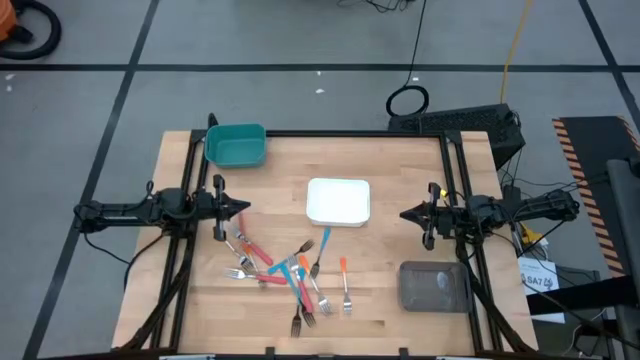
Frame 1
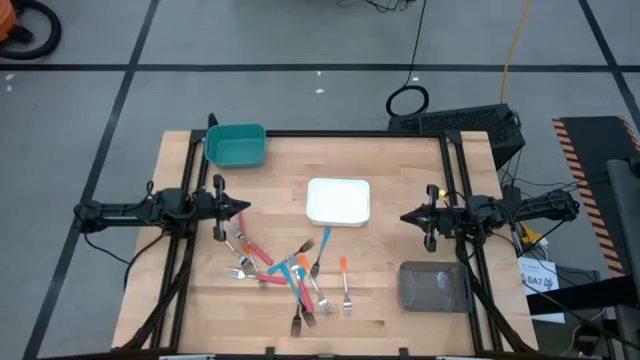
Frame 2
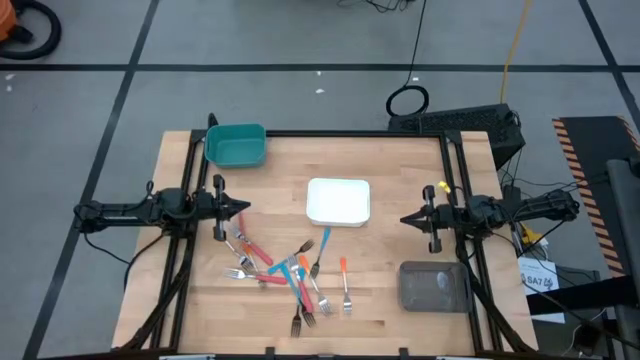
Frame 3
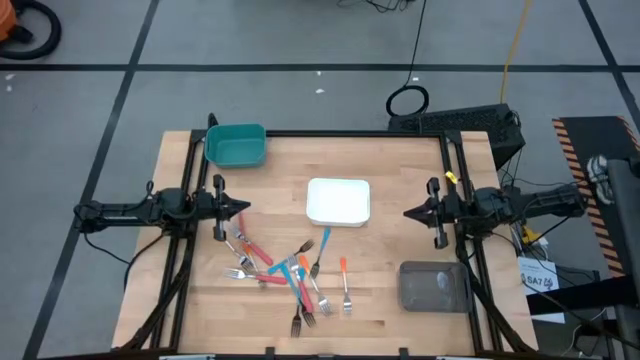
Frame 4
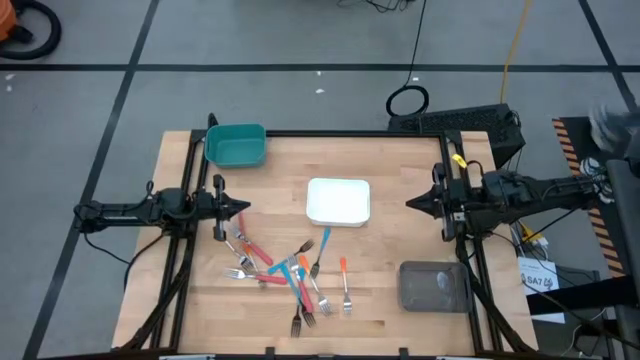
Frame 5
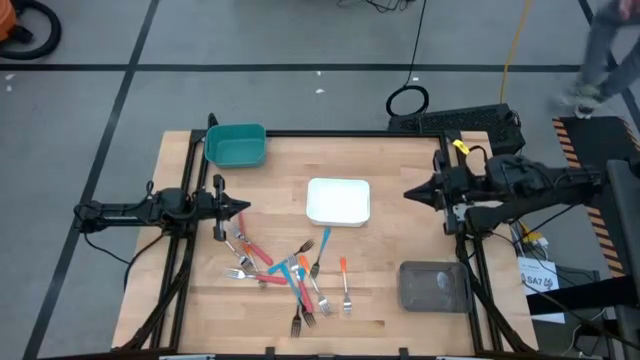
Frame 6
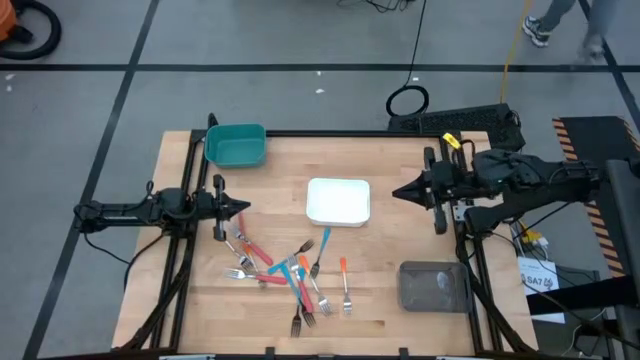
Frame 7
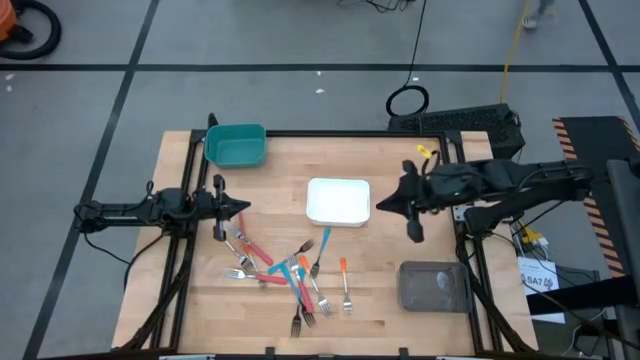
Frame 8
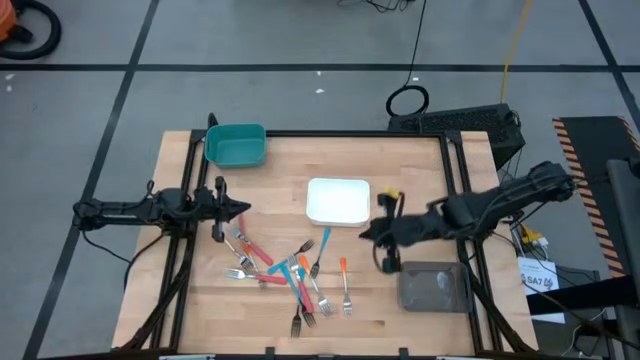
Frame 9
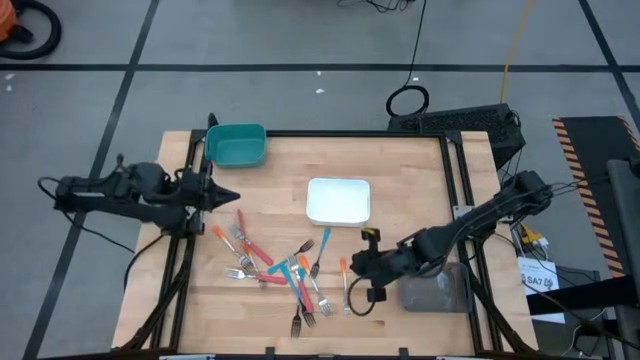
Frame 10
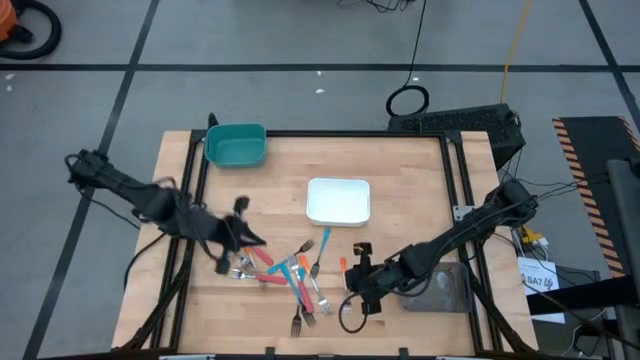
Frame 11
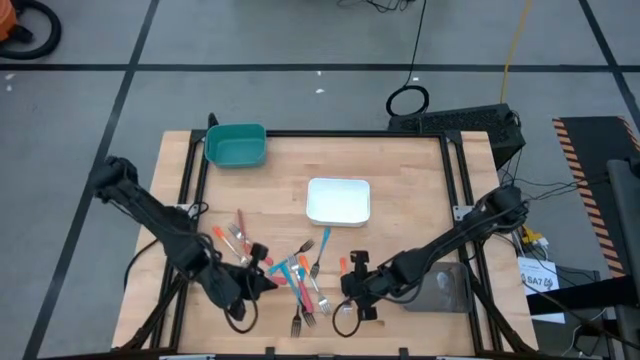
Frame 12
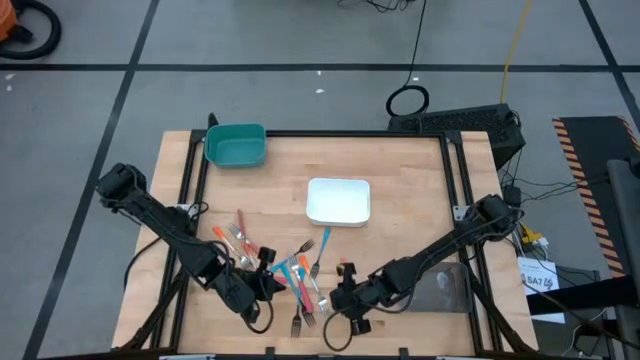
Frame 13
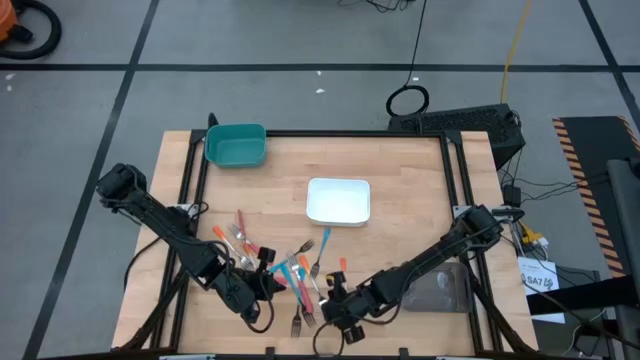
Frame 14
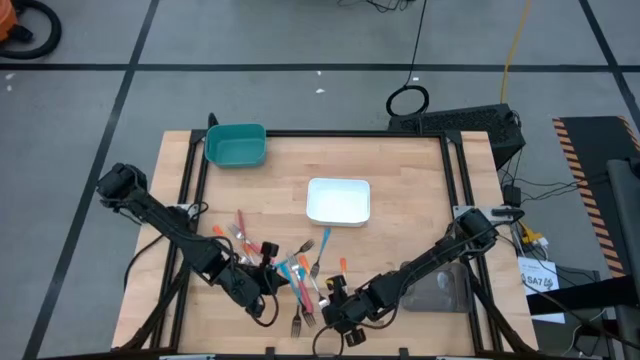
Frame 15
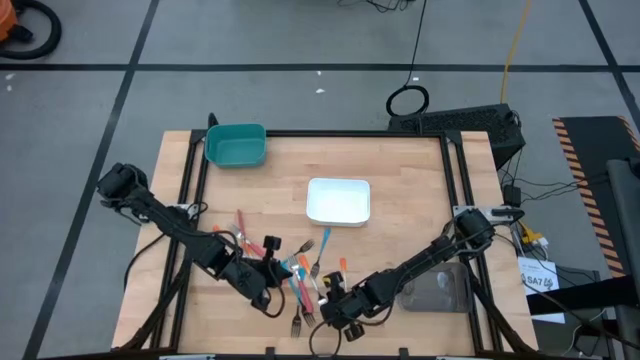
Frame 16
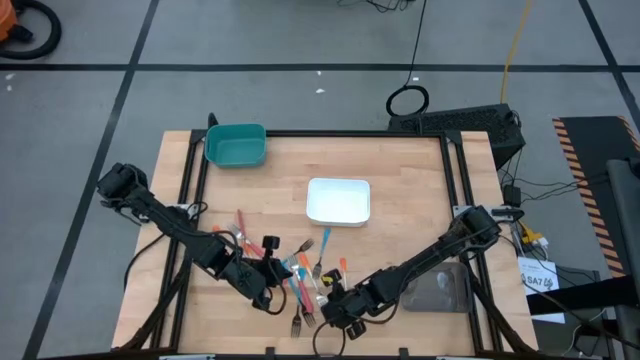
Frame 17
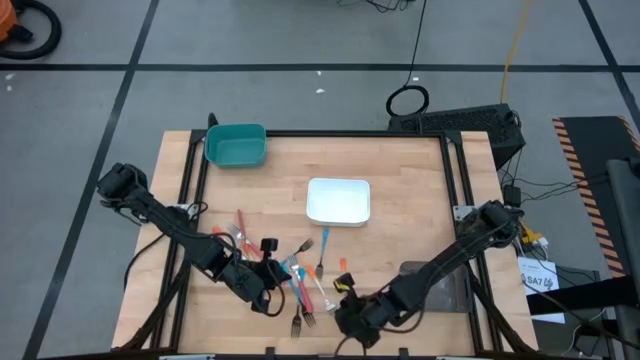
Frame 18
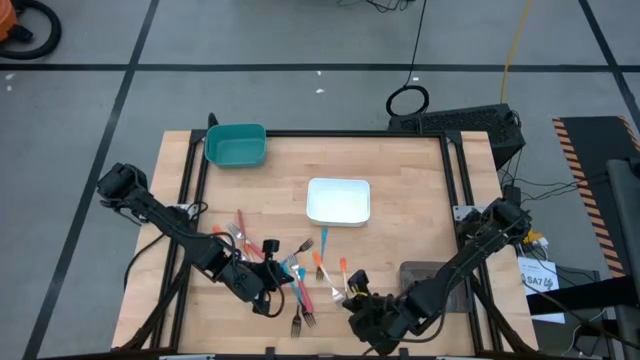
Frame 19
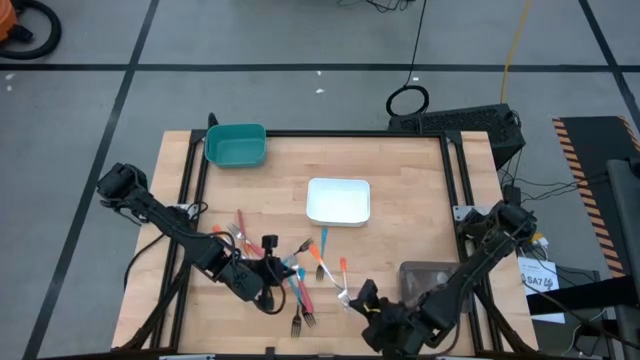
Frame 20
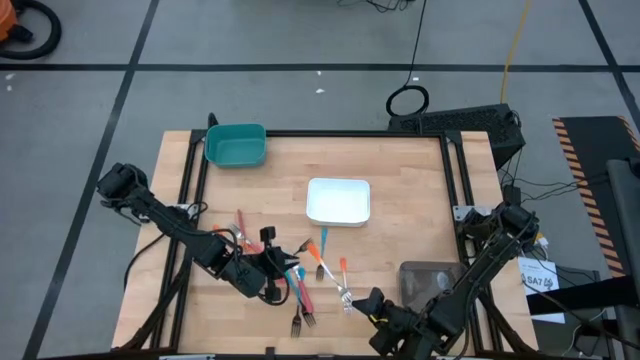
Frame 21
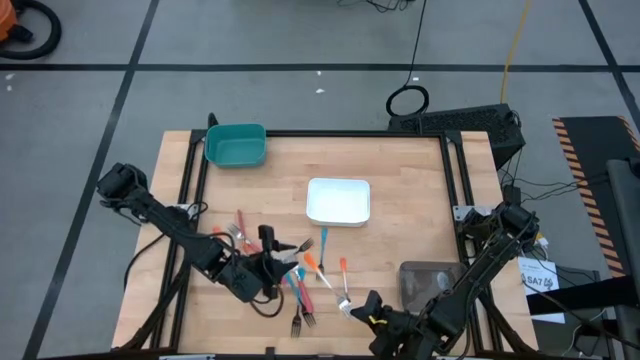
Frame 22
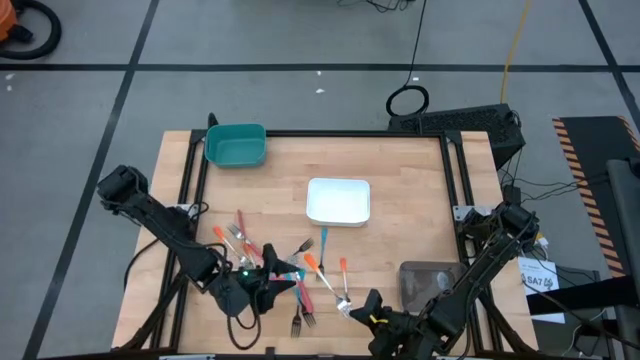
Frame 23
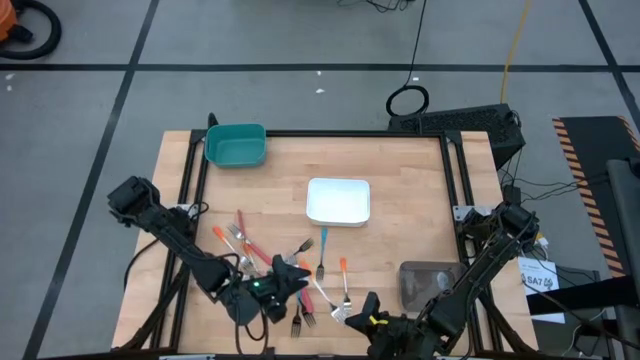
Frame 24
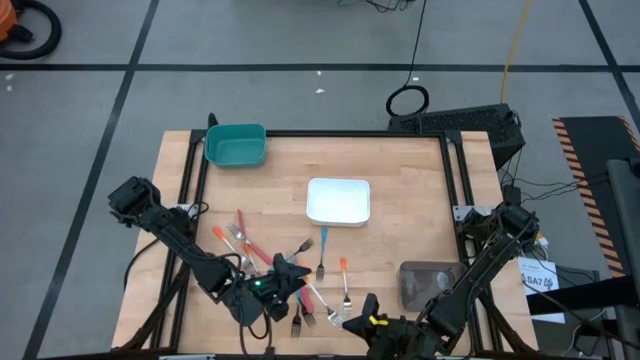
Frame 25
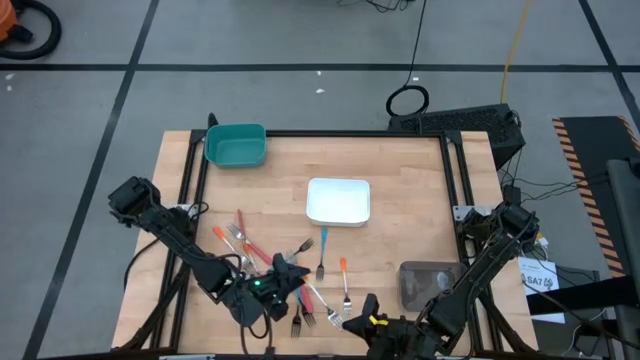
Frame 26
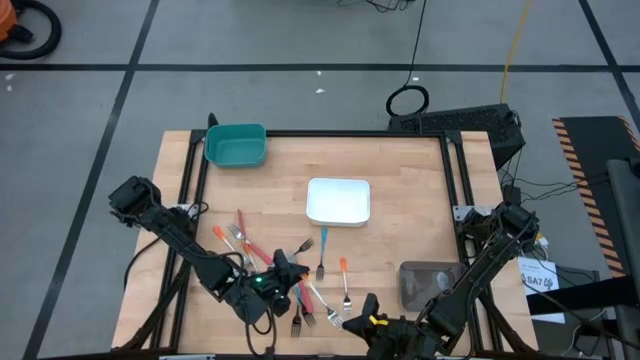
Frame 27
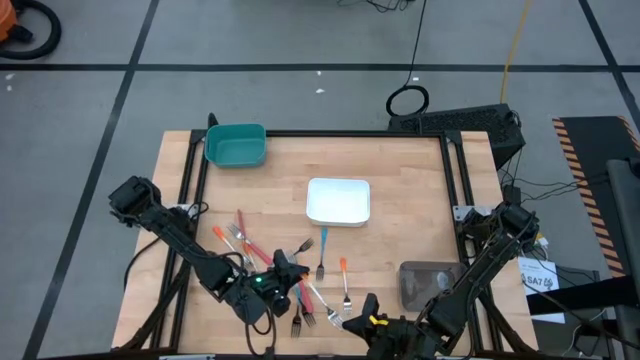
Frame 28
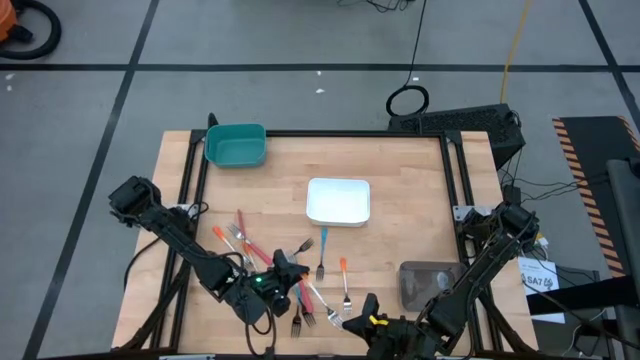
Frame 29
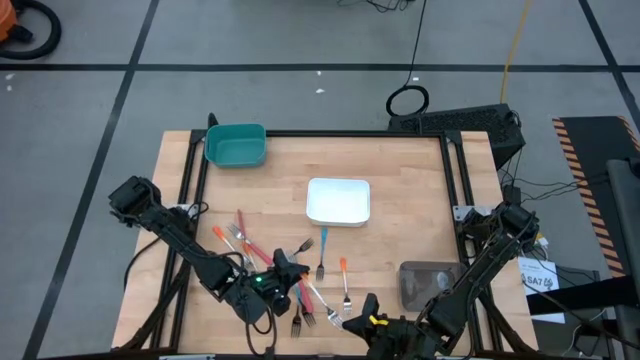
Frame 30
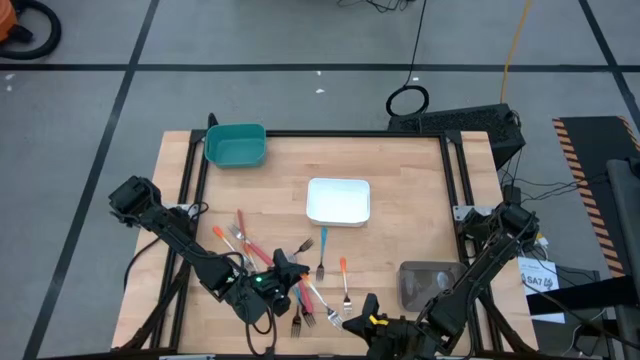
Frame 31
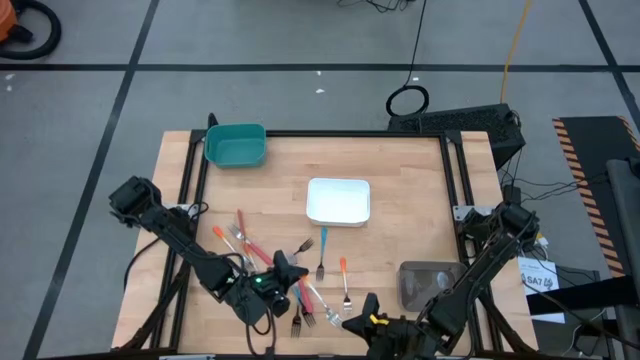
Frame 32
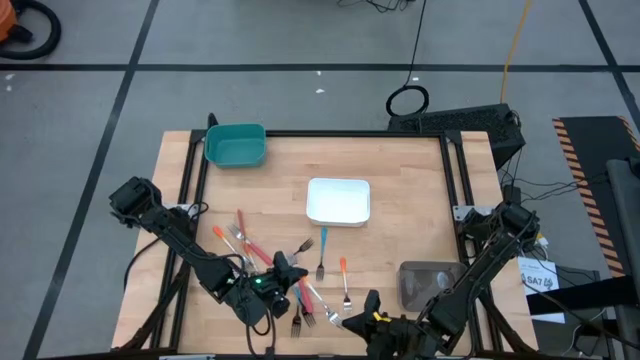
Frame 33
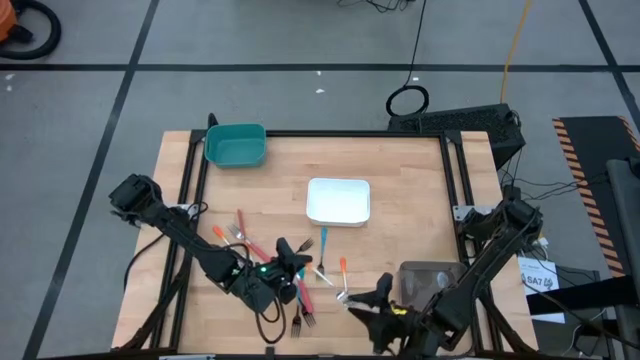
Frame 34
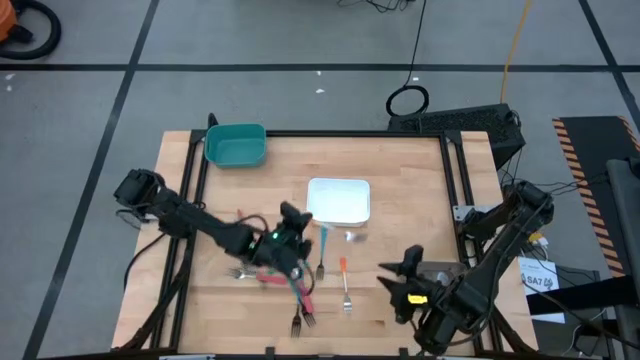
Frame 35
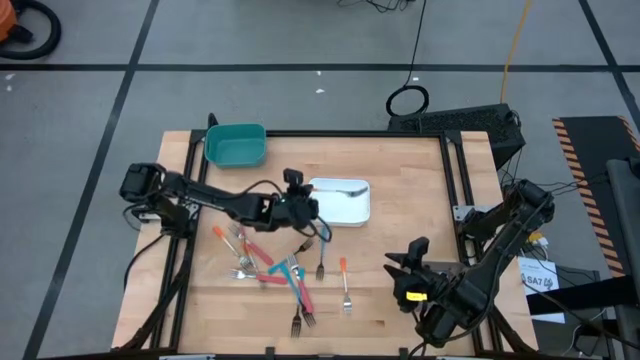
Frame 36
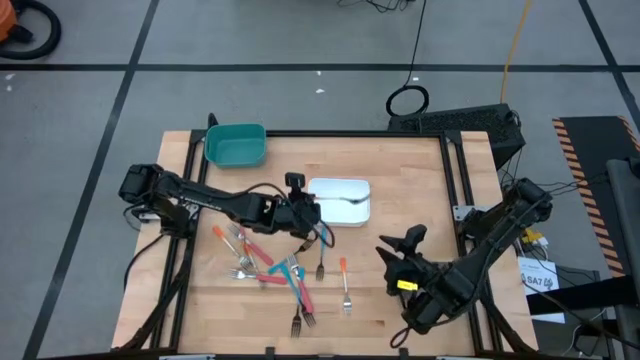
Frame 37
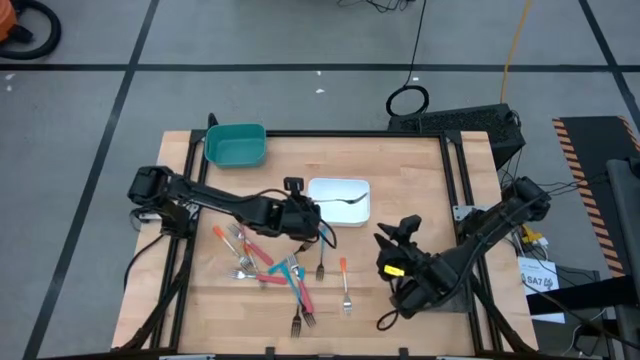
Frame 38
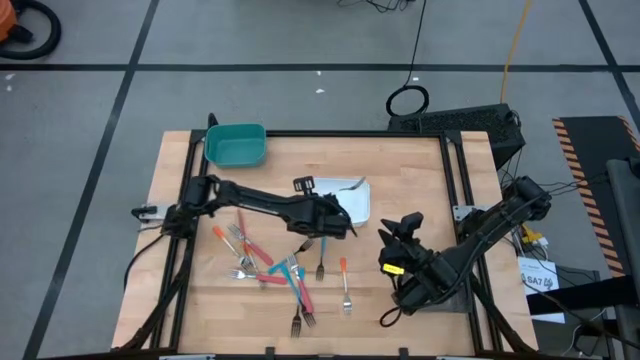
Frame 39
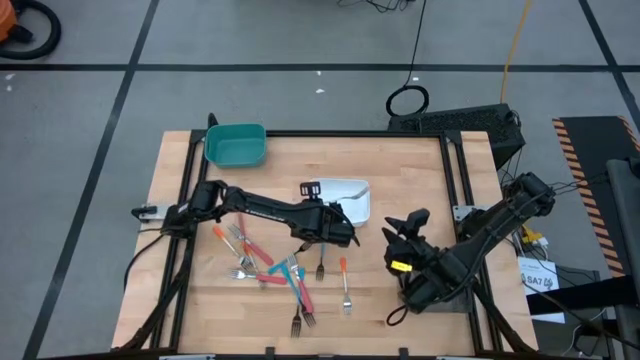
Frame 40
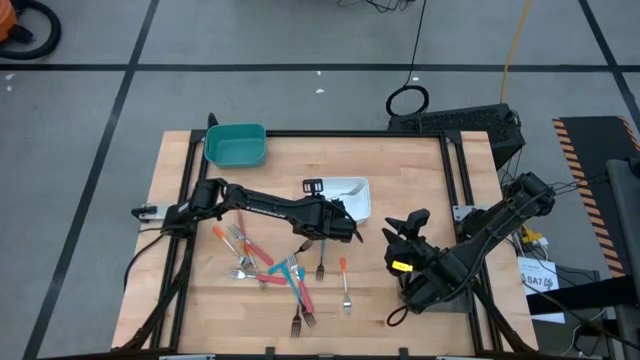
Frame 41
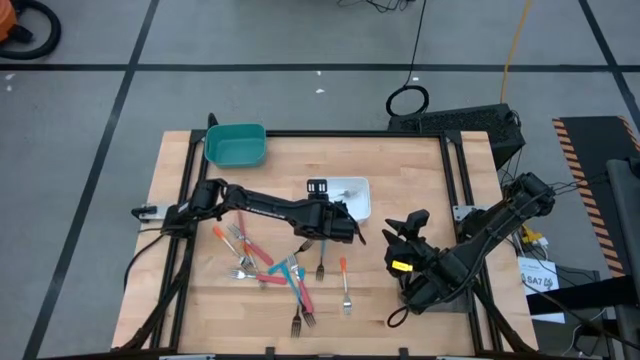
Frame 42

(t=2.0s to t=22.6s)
Task: Sort silverware by color (type)
Put the orange fork into the white bin
